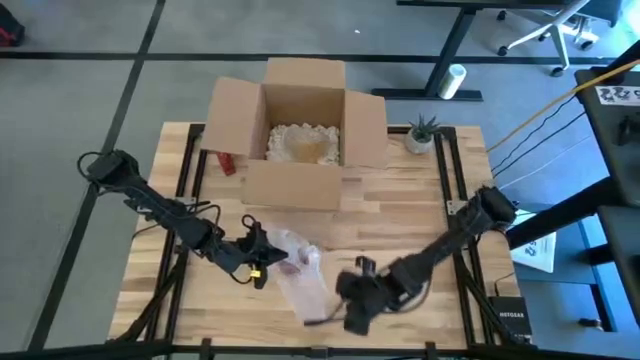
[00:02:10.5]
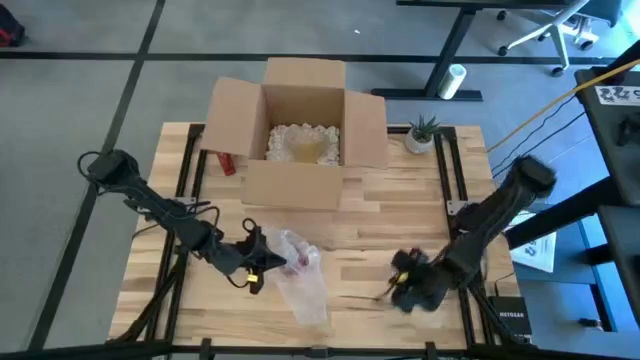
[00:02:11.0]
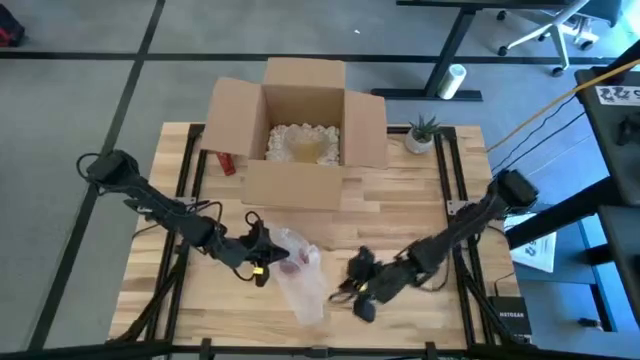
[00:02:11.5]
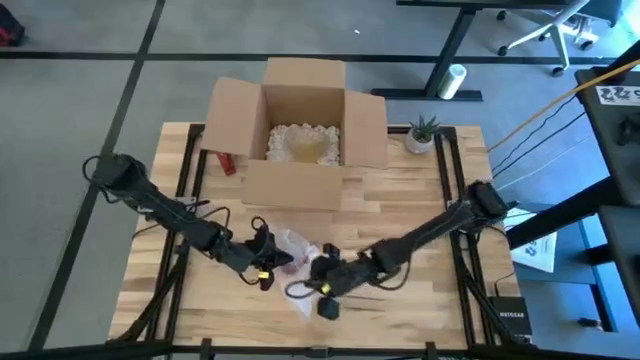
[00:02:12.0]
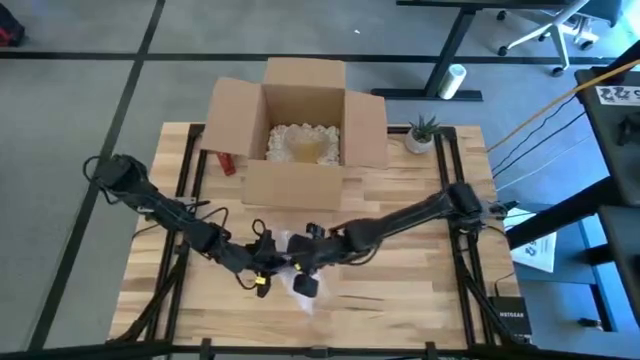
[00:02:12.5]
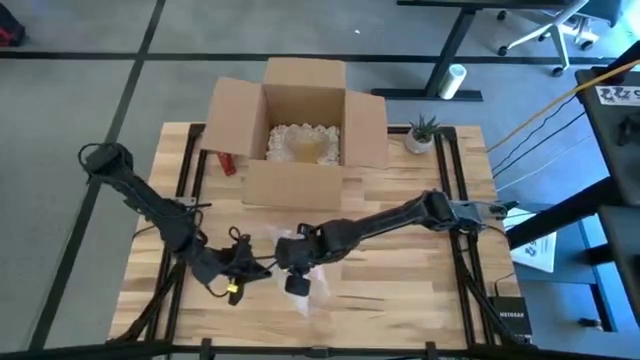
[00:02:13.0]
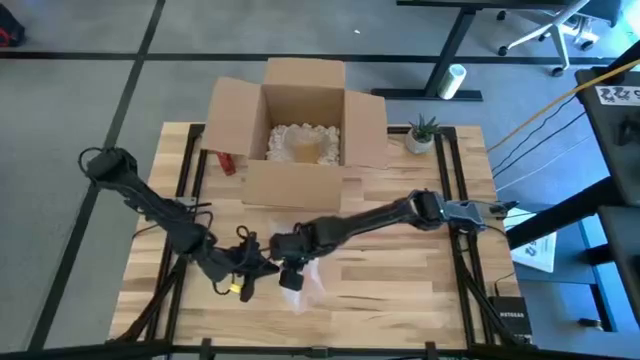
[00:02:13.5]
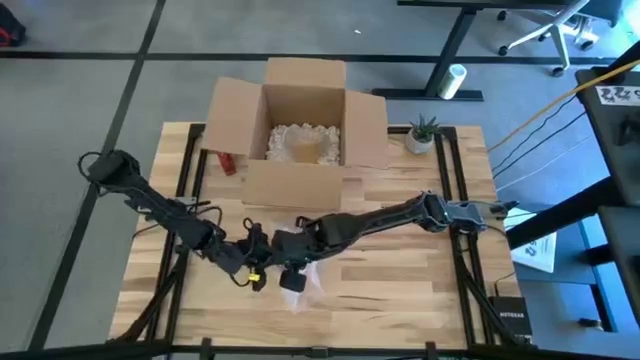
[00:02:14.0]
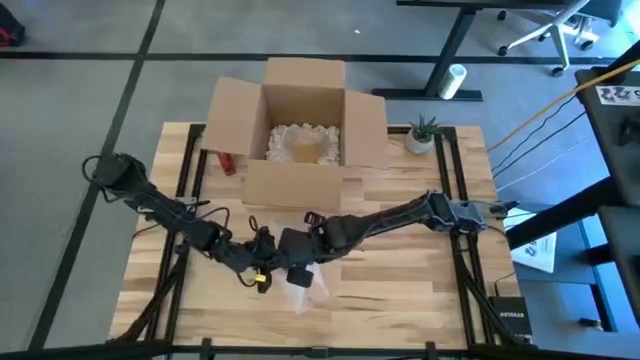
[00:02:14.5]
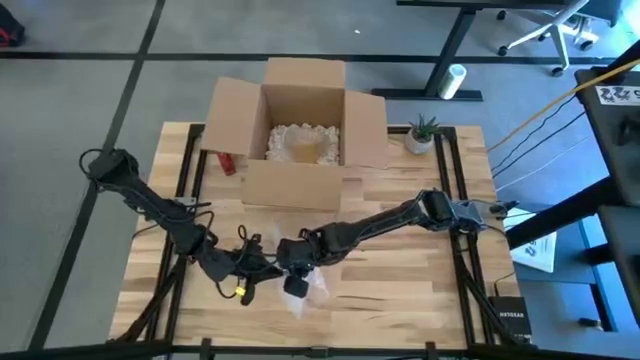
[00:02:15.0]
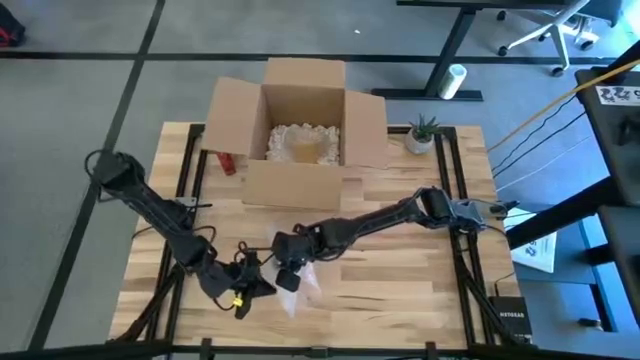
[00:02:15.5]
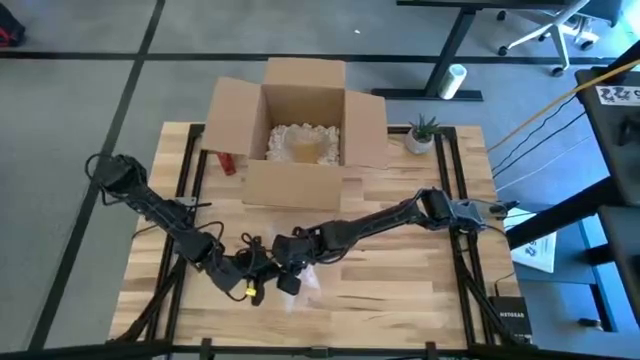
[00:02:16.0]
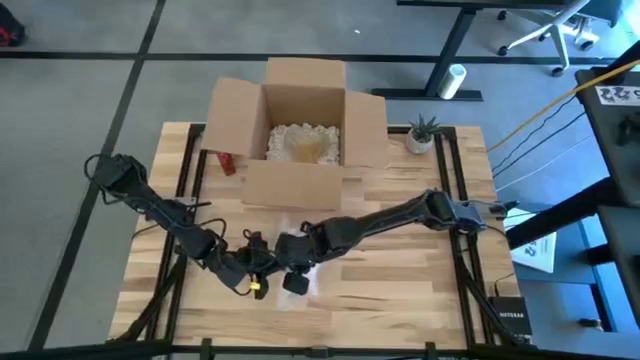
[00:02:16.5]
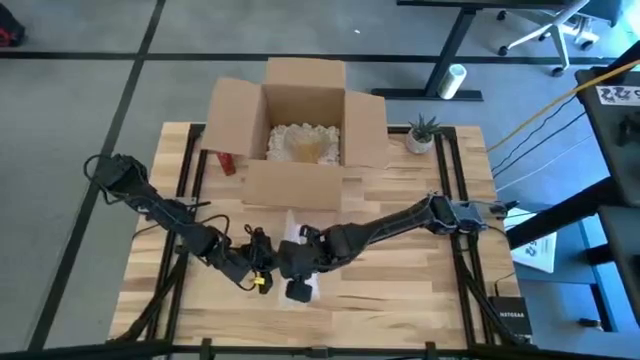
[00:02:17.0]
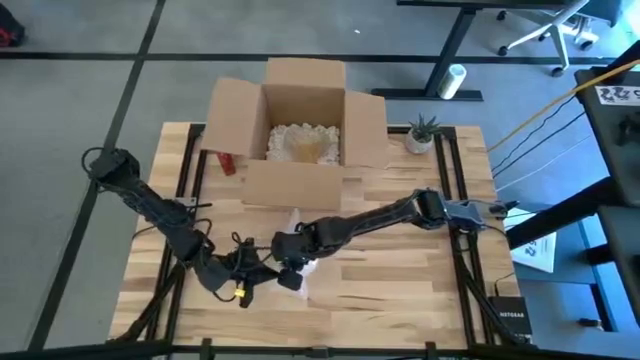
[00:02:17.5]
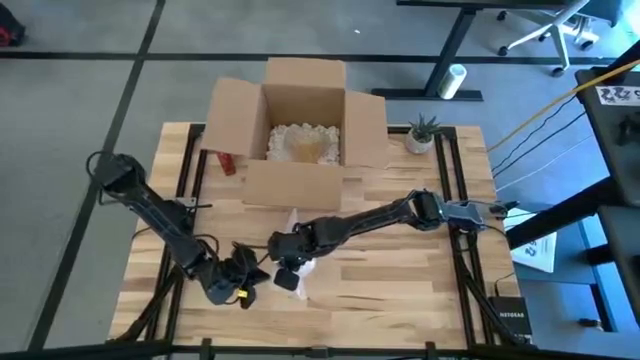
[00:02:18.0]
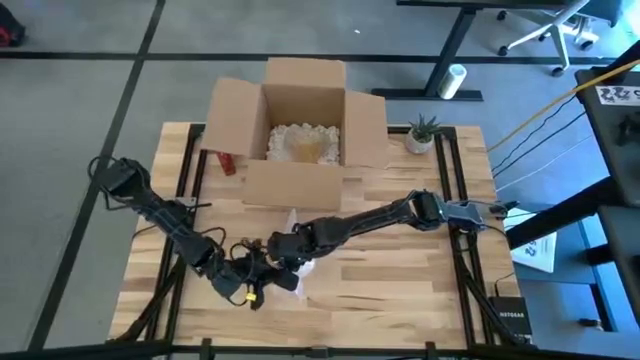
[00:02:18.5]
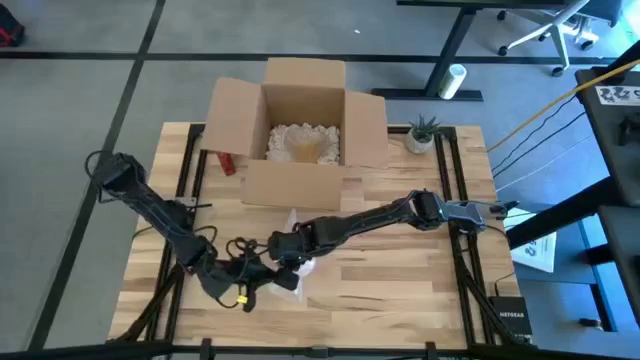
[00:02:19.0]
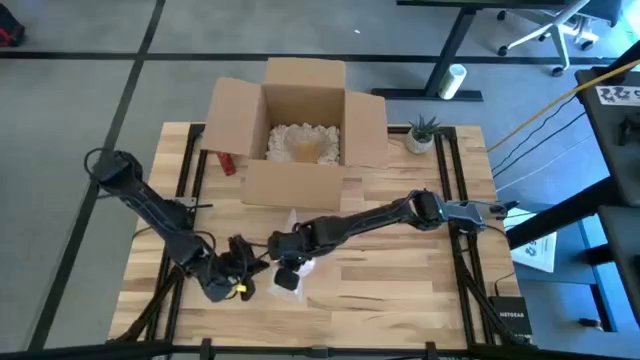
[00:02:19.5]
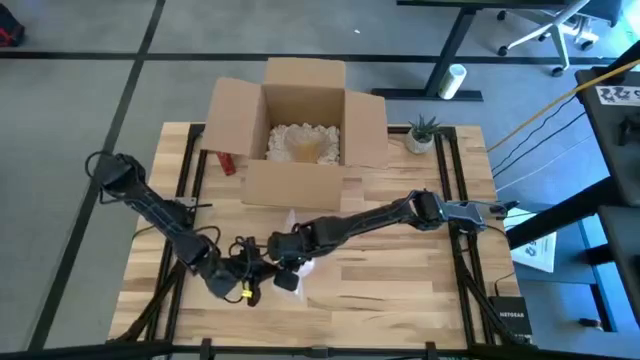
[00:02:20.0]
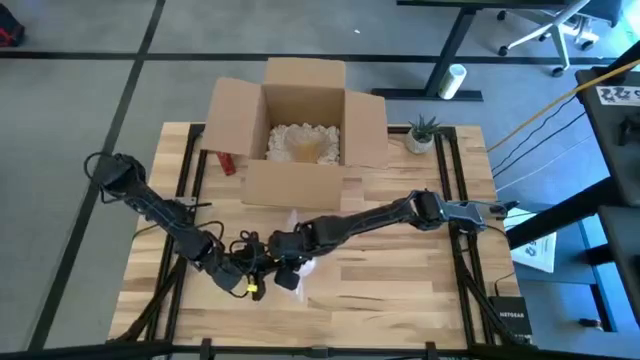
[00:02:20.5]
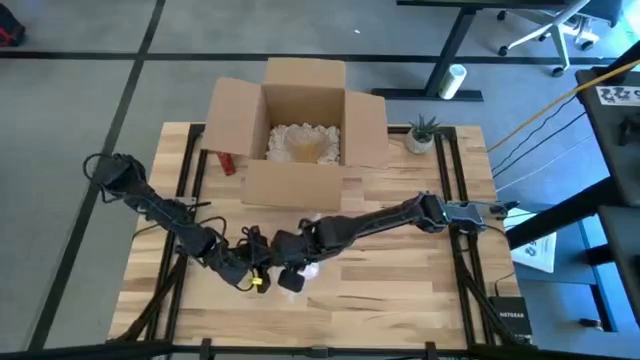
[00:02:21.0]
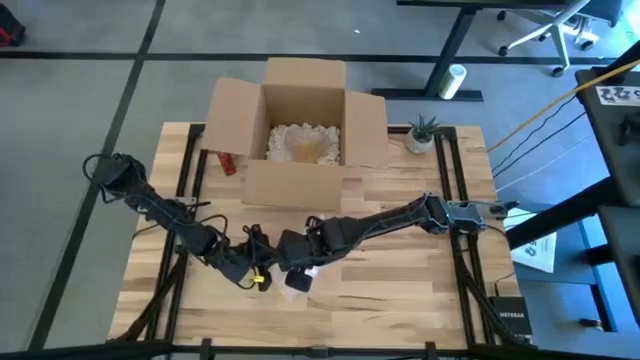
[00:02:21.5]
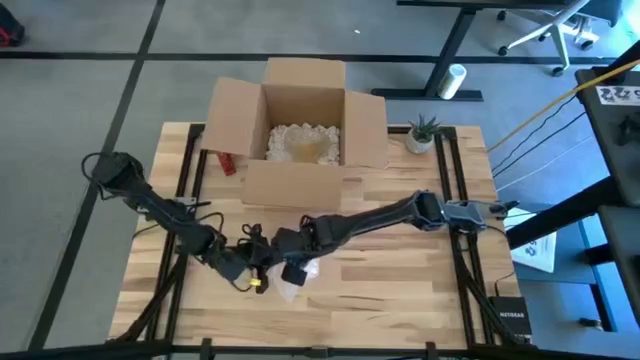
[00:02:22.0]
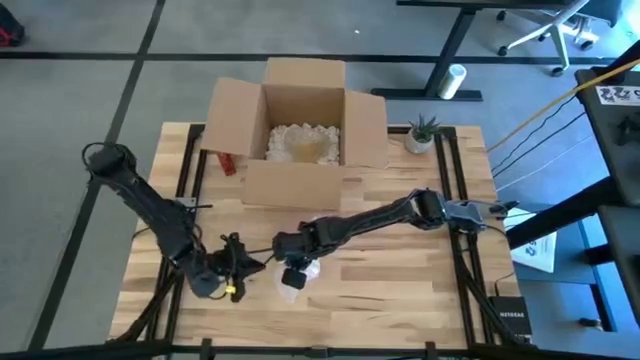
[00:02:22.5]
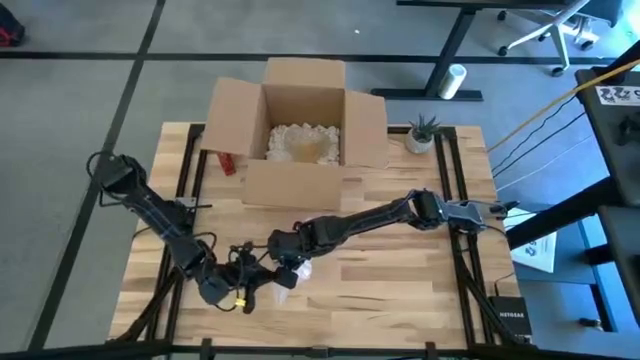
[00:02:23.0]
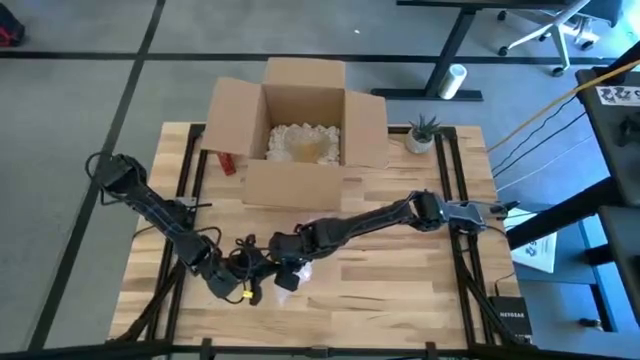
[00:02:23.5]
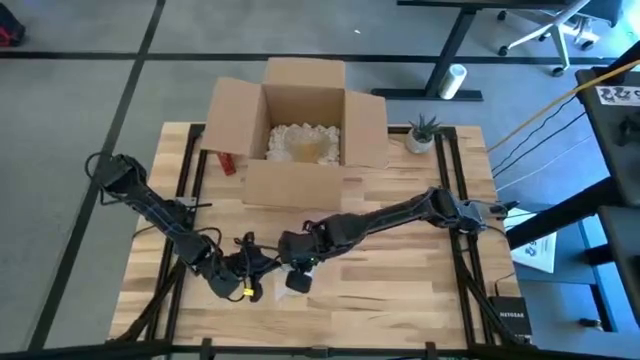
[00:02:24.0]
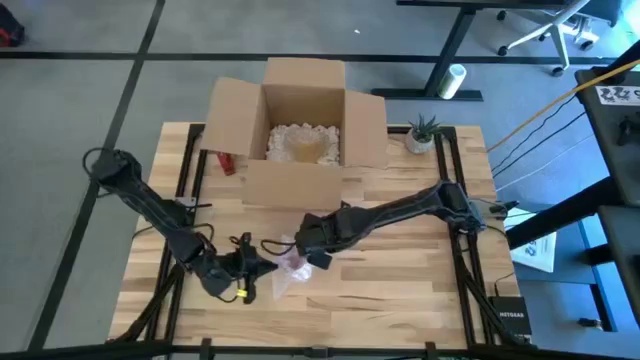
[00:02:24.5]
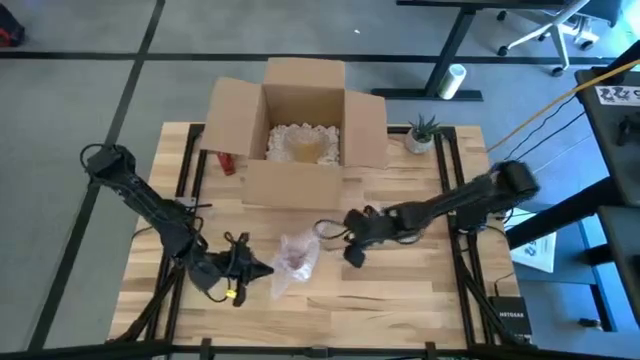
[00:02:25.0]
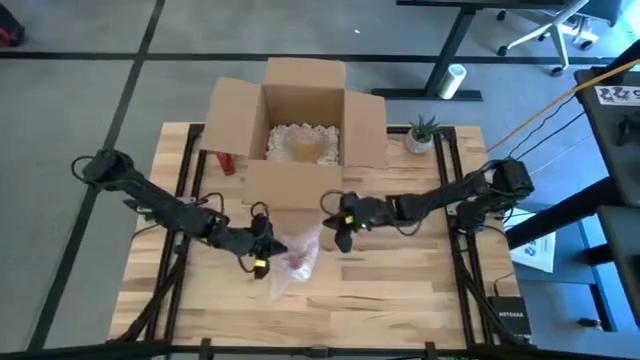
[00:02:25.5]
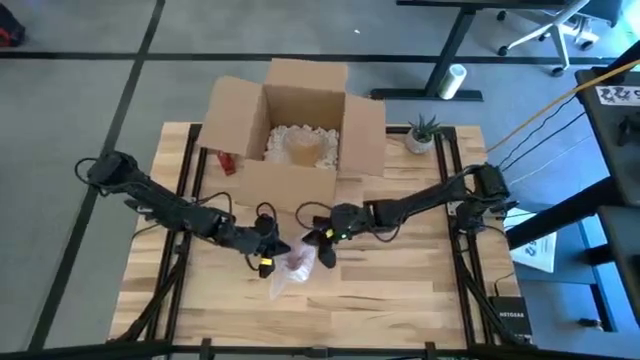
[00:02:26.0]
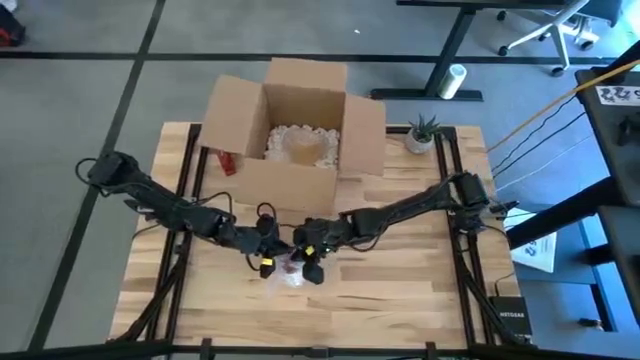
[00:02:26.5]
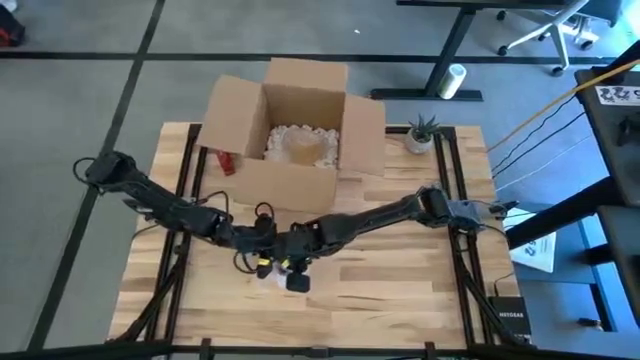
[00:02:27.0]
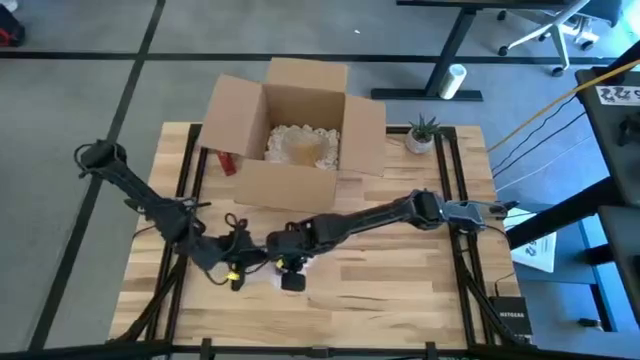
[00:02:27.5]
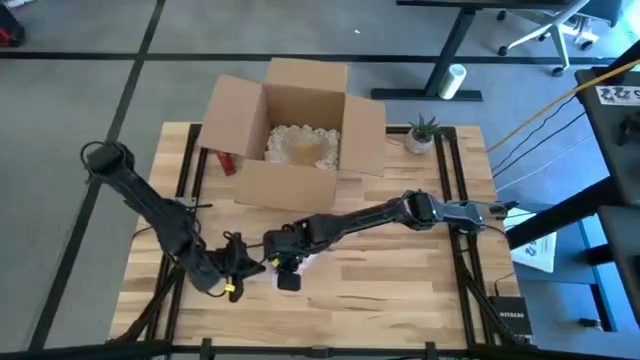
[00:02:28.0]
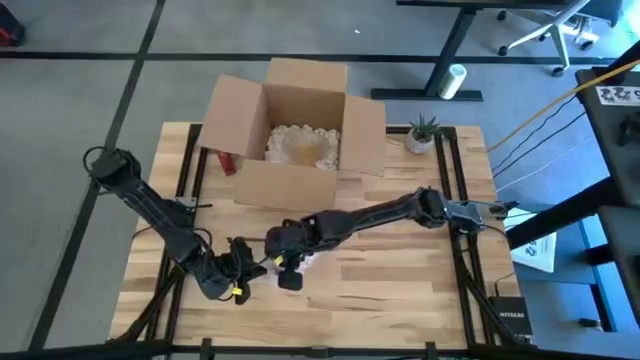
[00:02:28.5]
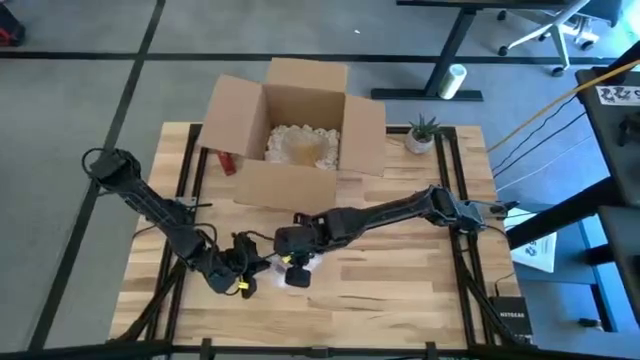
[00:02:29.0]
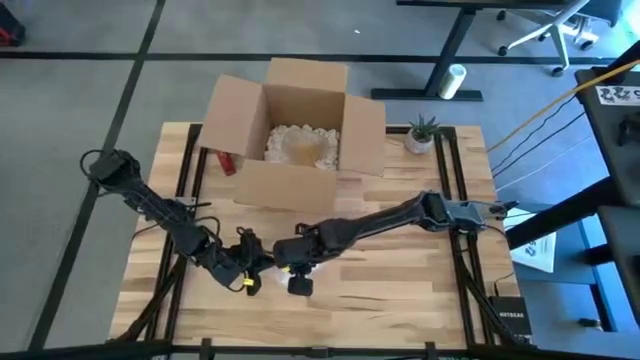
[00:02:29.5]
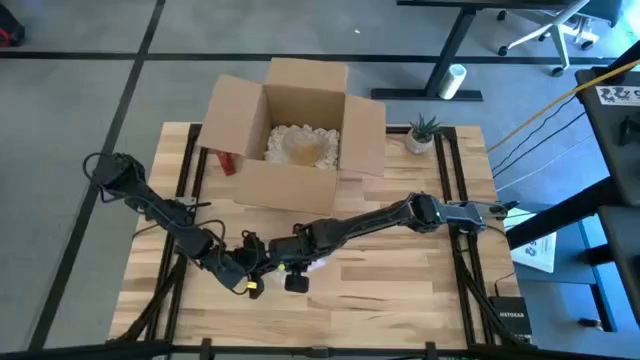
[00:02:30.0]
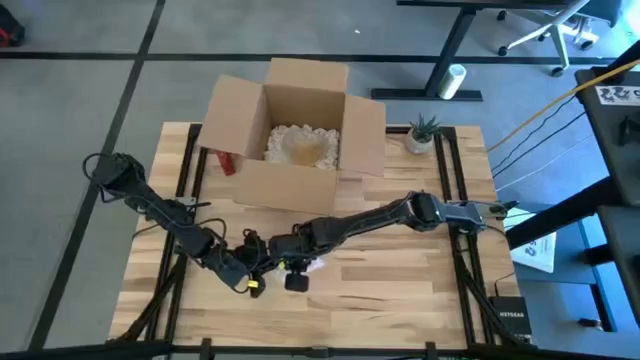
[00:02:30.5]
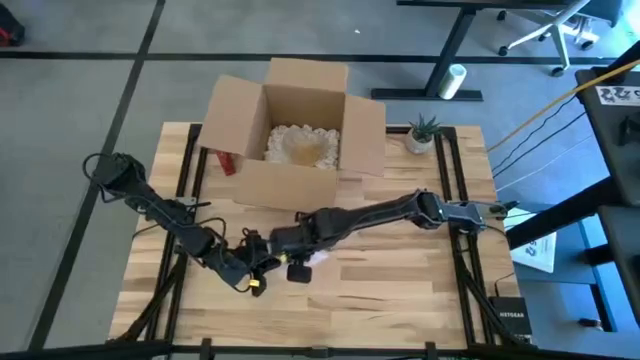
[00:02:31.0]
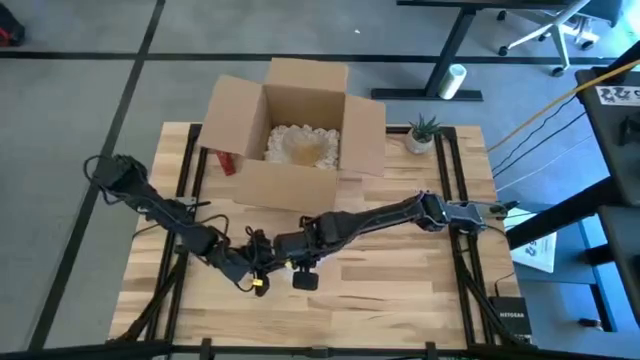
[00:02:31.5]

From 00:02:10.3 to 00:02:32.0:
Task: wrap mug
Wrap the red mug with bubble wrap
